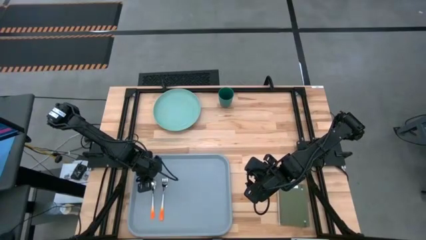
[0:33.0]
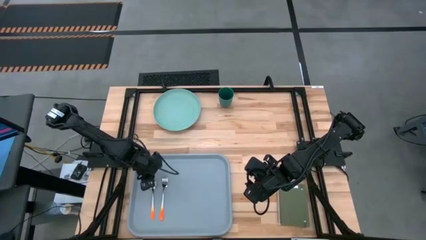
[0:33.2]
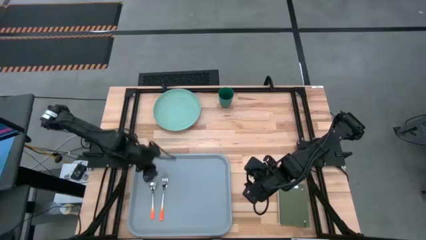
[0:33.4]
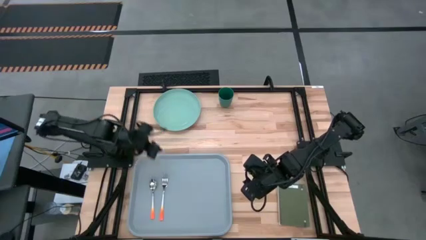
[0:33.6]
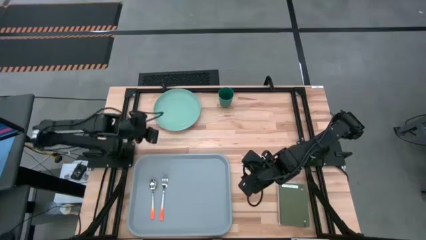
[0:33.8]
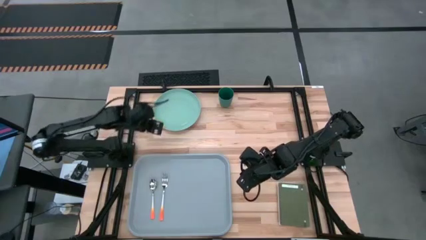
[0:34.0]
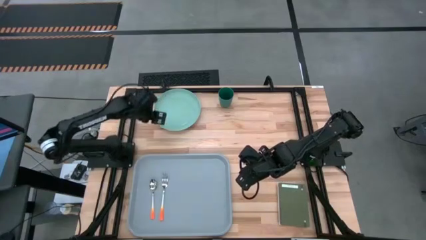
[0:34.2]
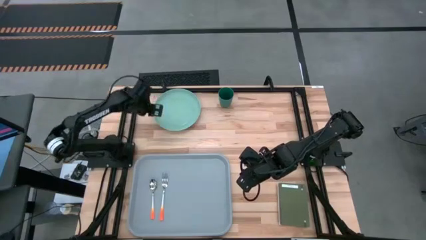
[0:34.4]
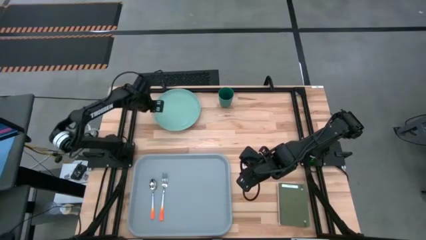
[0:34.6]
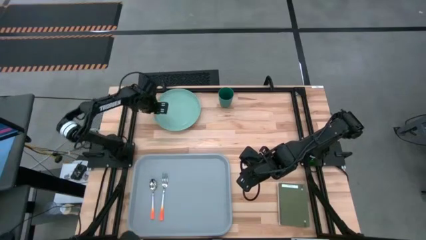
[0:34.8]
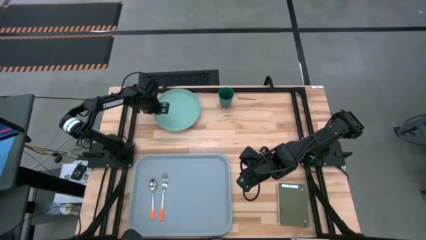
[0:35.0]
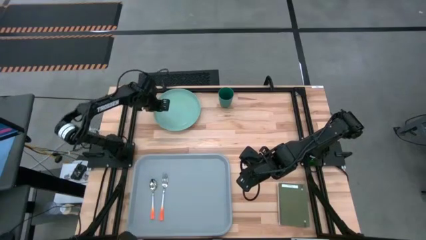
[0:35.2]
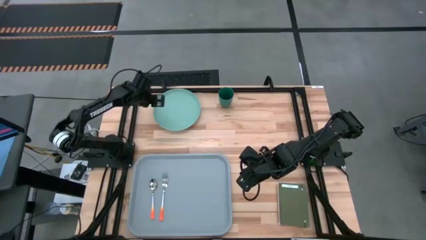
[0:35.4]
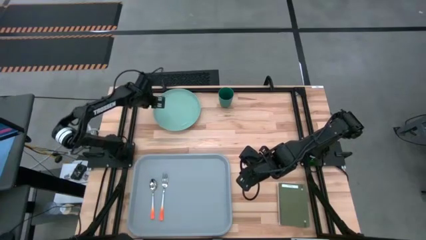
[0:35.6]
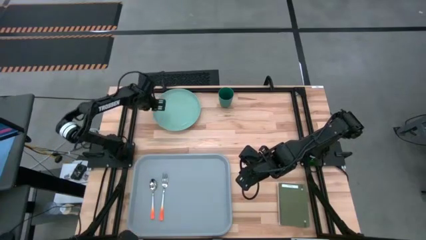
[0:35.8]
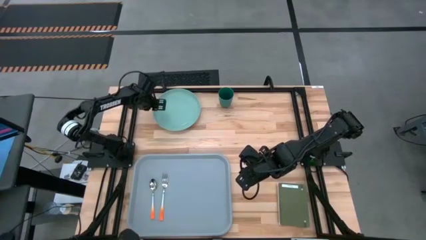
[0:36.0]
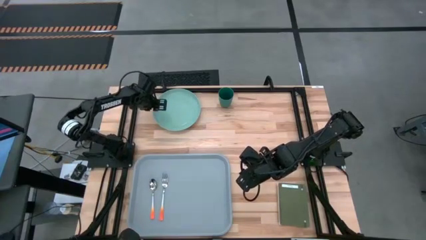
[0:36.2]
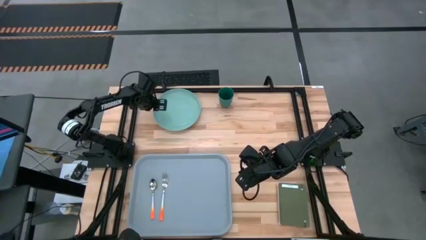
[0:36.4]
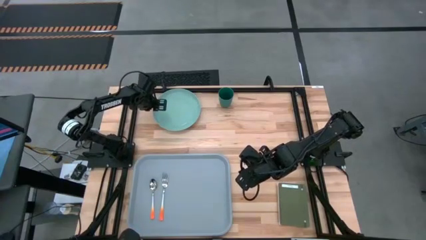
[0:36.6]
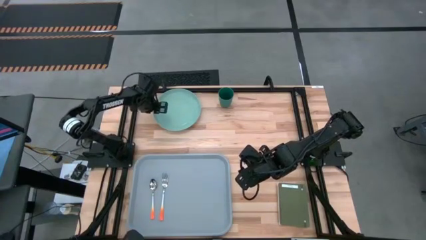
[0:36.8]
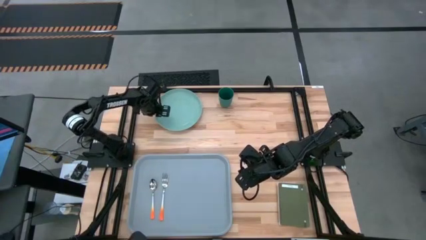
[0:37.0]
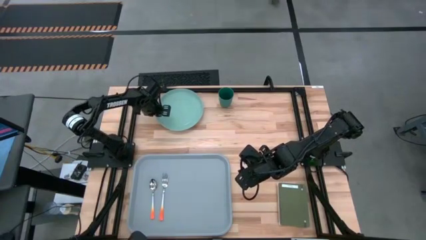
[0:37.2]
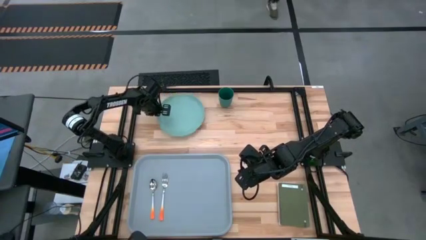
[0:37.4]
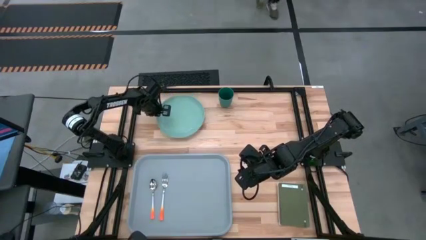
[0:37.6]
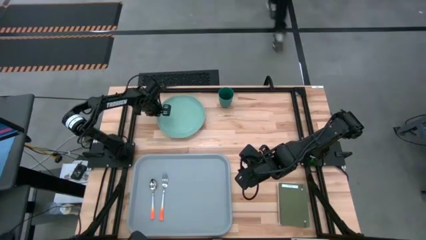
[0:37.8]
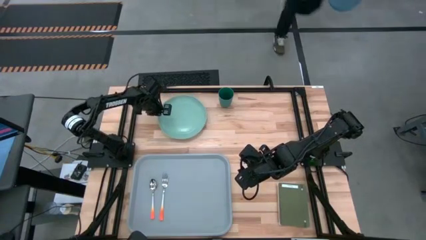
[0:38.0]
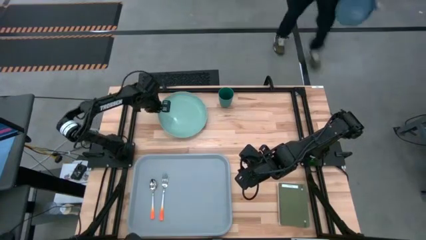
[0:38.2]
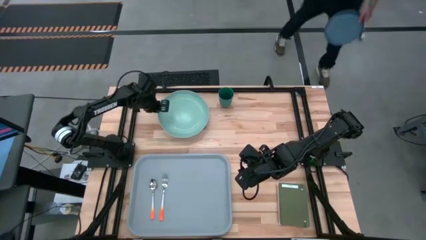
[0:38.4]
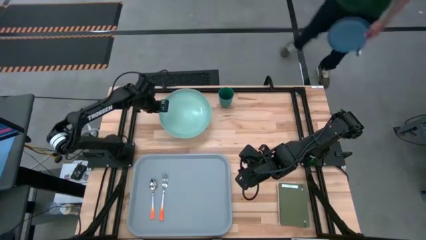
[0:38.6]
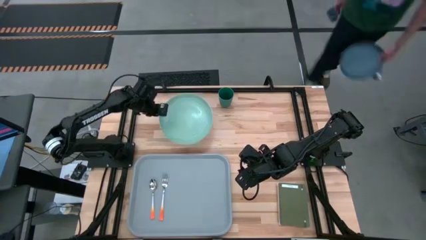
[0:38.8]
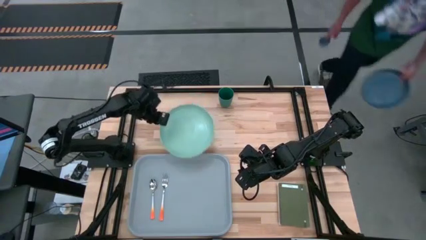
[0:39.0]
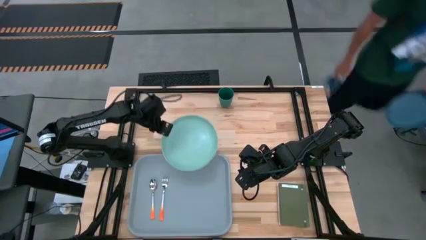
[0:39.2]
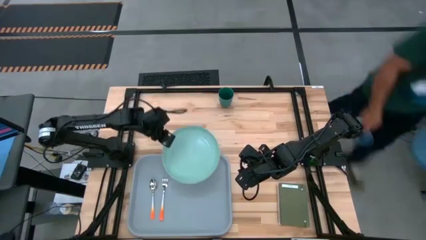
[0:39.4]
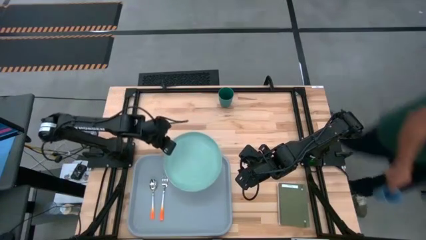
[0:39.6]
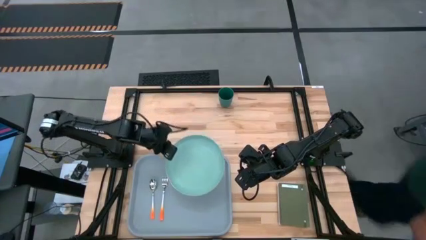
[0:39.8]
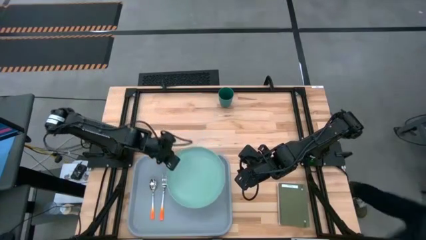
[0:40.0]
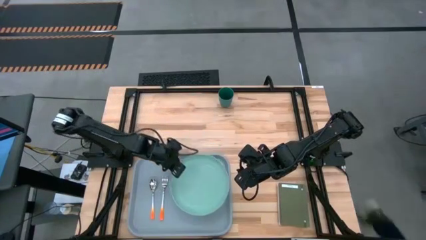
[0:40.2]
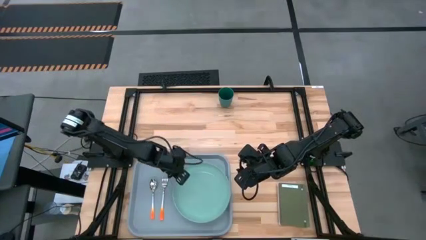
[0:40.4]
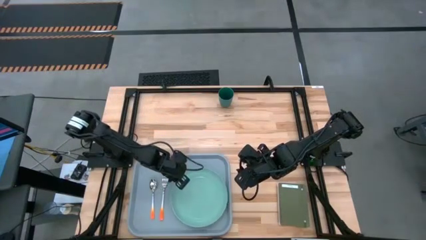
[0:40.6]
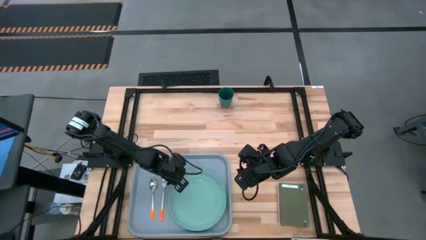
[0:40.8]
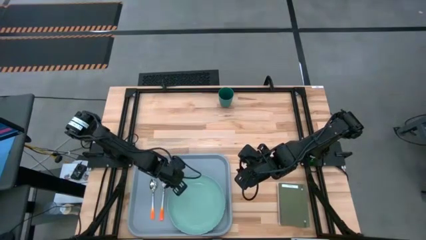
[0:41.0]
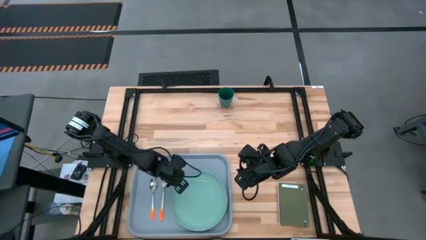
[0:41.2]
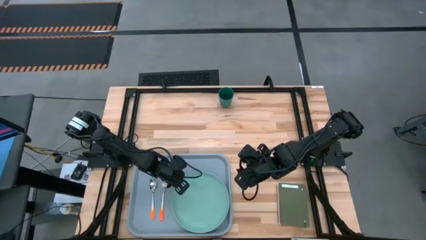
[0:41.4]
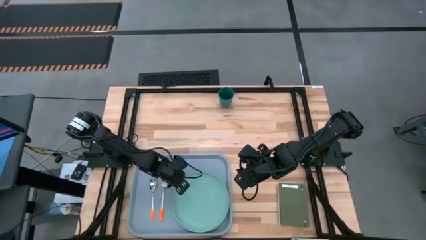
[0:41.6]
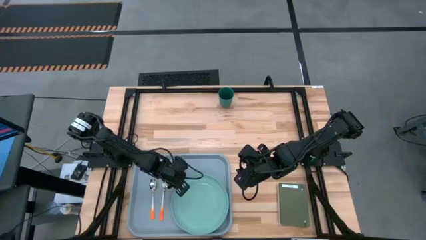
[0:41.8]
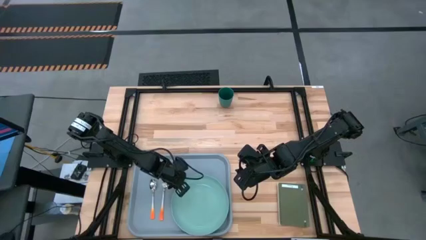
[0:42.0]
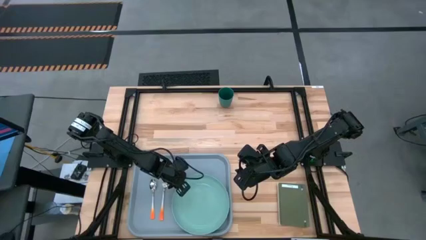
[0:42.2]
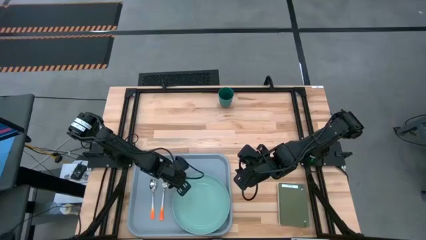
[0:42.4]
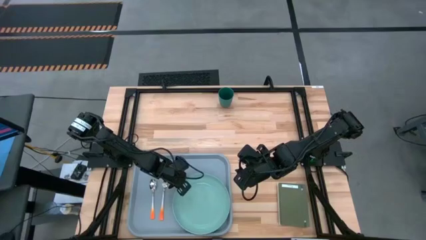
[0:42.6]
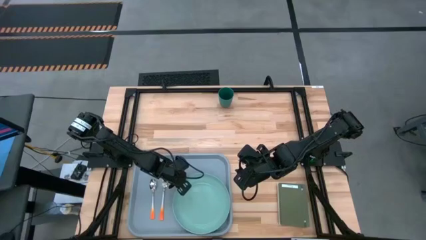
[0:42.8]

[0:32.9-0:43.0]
Task: Pick and place plate/cup/fork/spoon on tray
Put the green plate on the gray tray to the right of the orange fork
